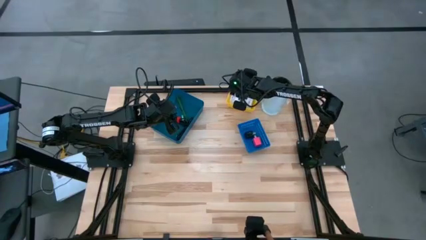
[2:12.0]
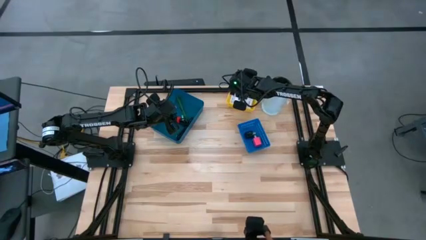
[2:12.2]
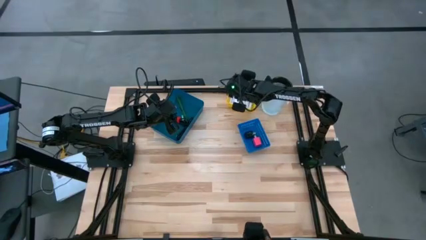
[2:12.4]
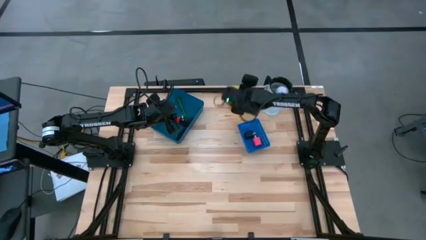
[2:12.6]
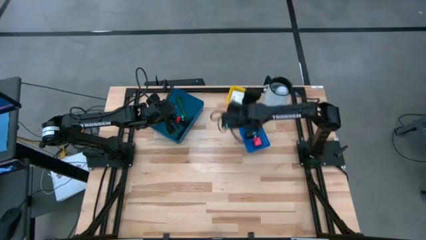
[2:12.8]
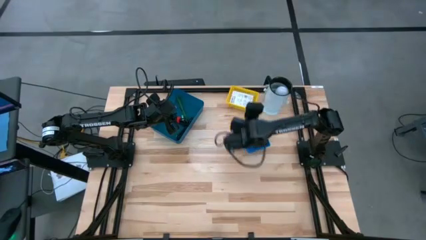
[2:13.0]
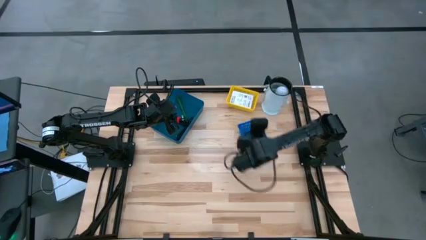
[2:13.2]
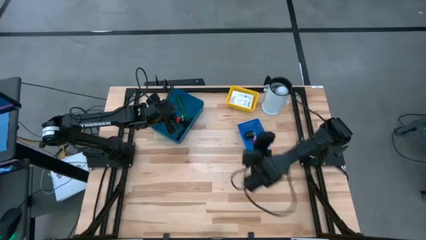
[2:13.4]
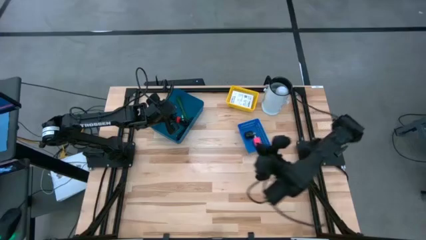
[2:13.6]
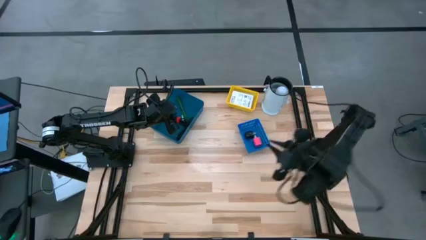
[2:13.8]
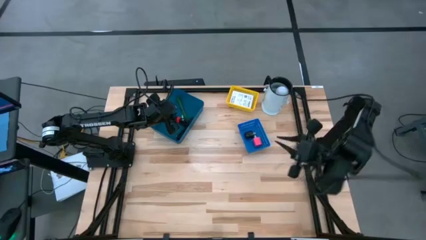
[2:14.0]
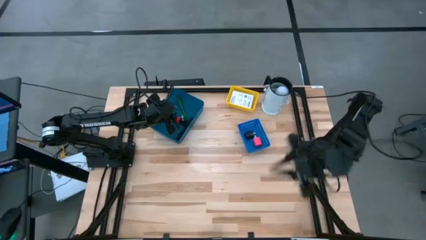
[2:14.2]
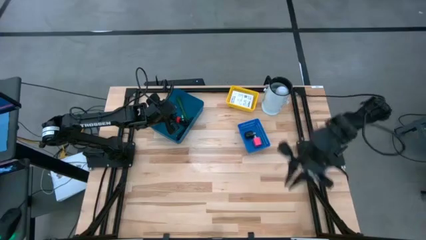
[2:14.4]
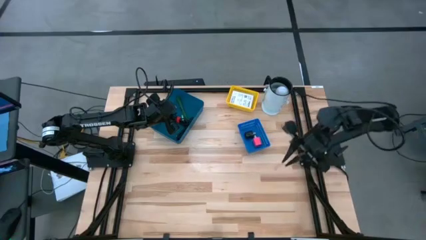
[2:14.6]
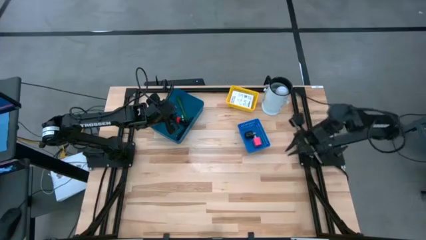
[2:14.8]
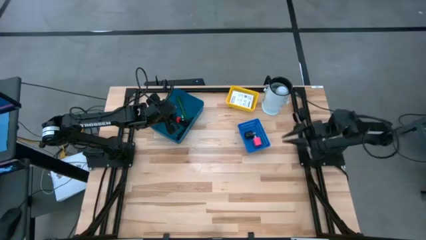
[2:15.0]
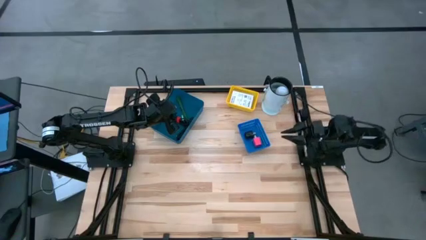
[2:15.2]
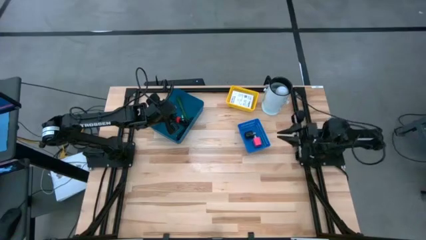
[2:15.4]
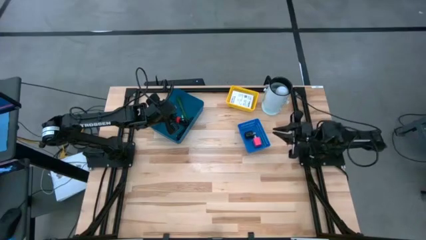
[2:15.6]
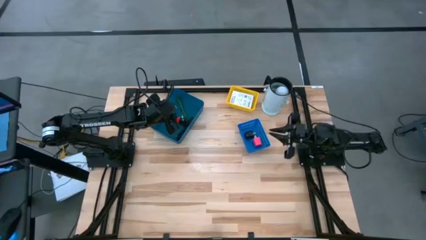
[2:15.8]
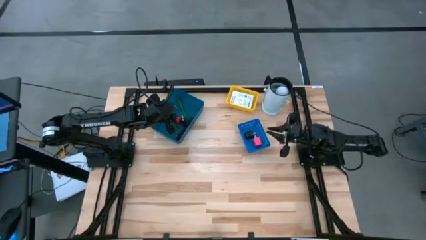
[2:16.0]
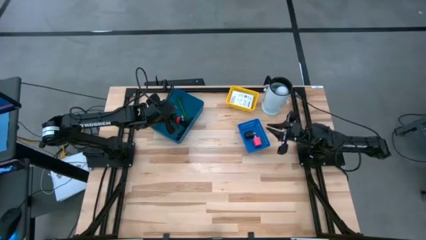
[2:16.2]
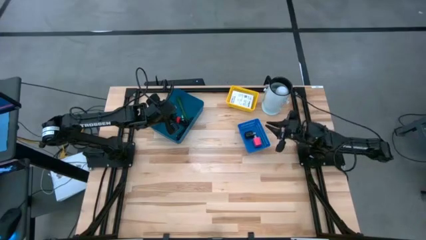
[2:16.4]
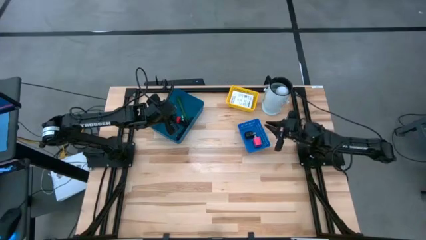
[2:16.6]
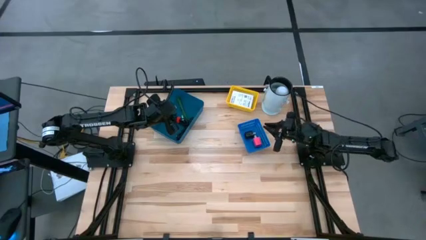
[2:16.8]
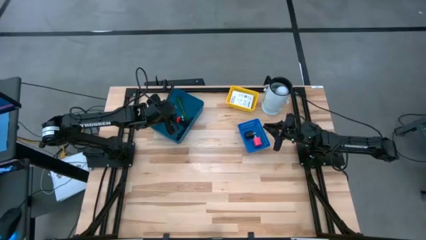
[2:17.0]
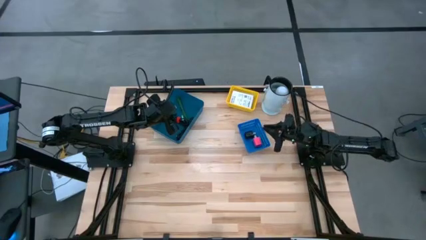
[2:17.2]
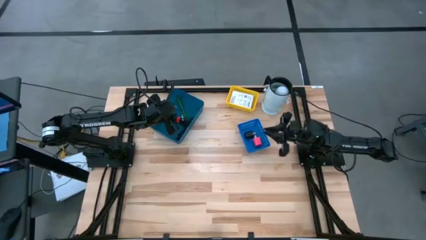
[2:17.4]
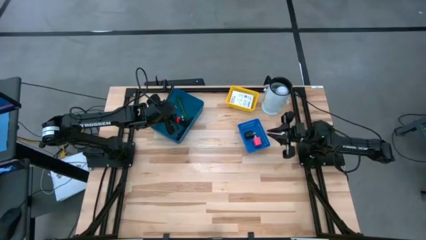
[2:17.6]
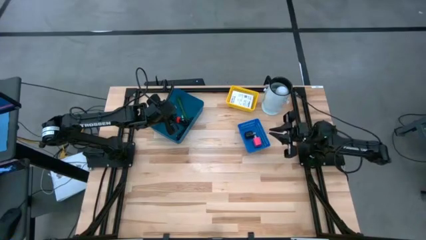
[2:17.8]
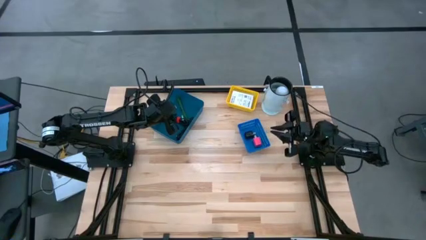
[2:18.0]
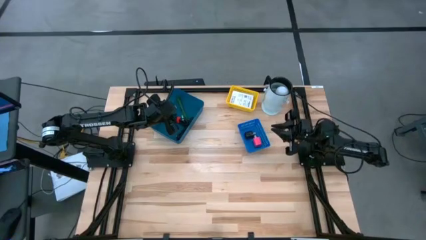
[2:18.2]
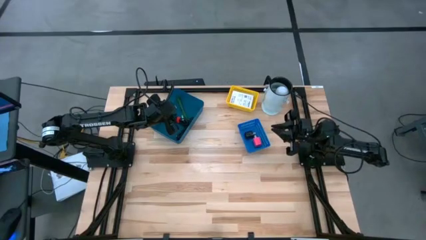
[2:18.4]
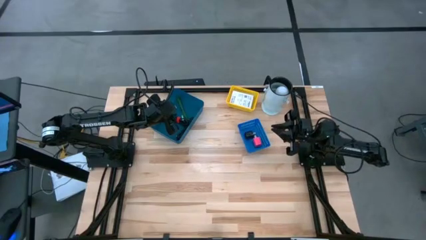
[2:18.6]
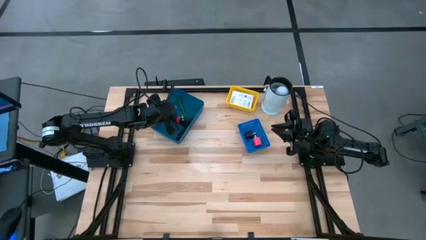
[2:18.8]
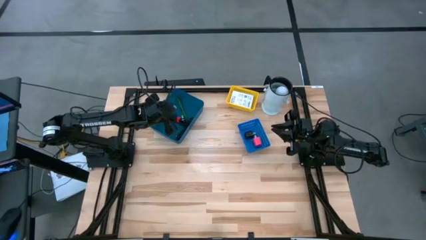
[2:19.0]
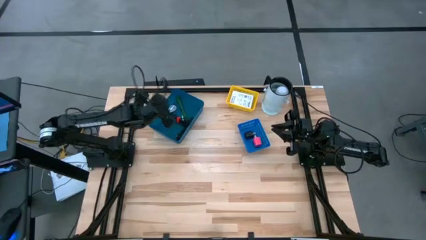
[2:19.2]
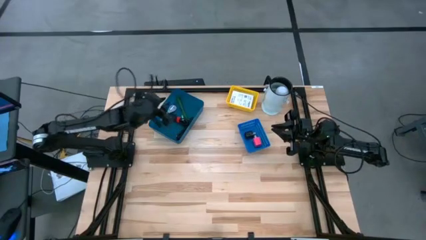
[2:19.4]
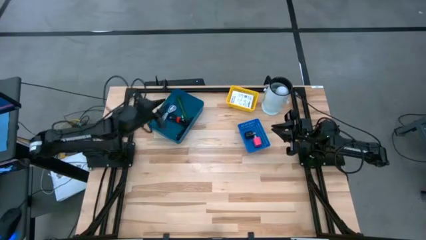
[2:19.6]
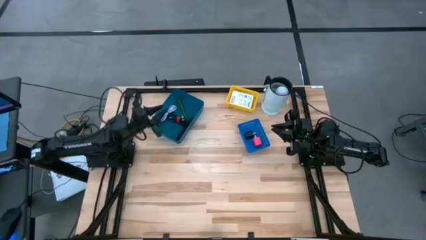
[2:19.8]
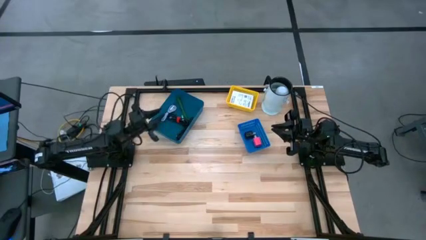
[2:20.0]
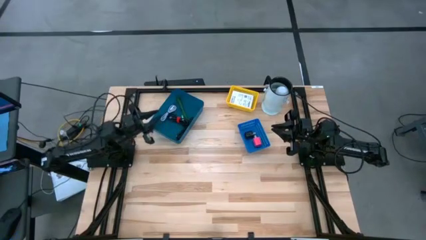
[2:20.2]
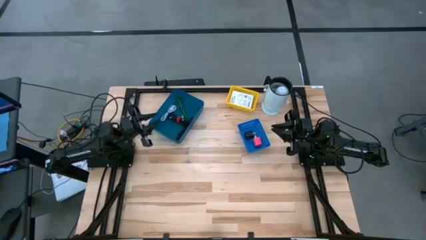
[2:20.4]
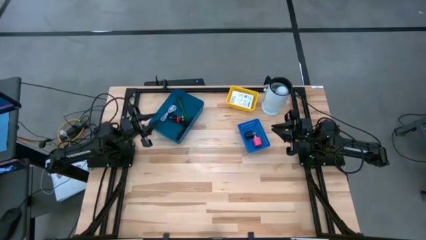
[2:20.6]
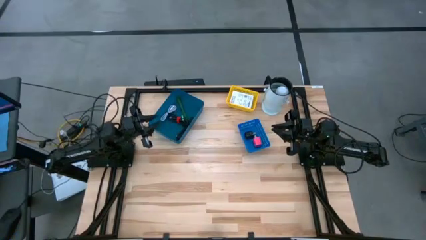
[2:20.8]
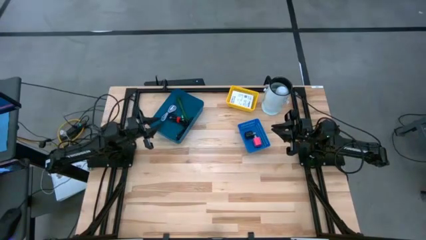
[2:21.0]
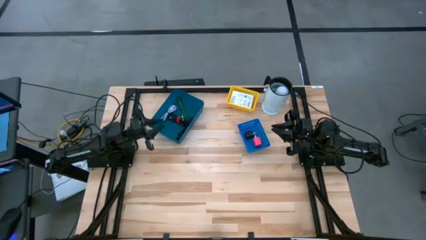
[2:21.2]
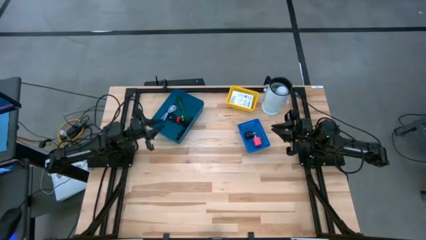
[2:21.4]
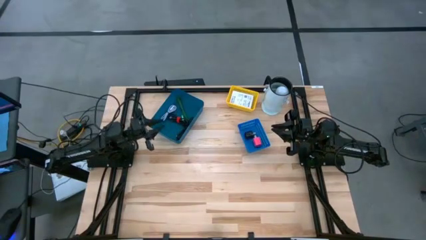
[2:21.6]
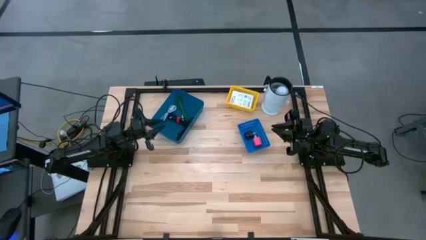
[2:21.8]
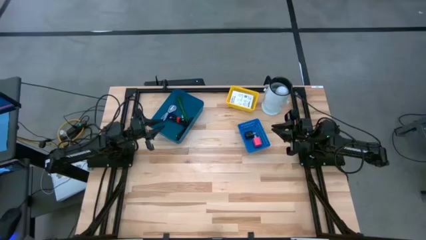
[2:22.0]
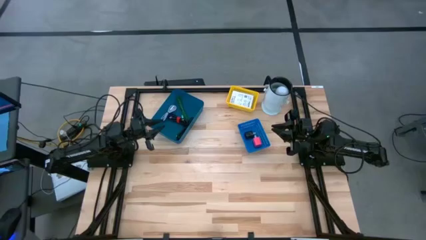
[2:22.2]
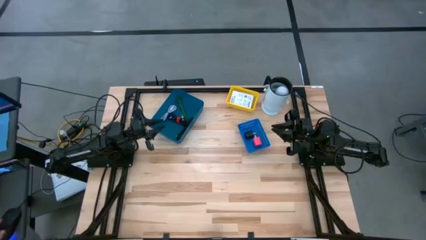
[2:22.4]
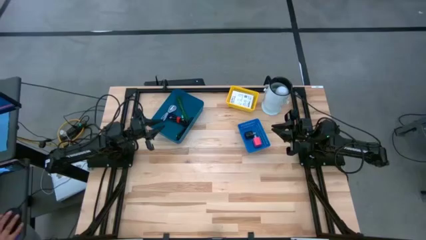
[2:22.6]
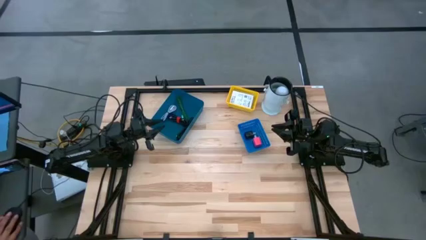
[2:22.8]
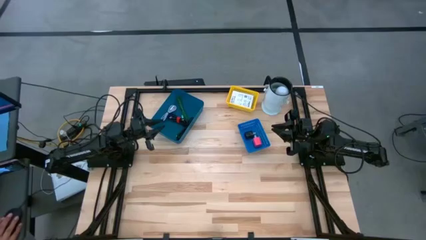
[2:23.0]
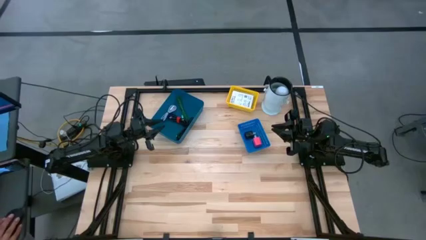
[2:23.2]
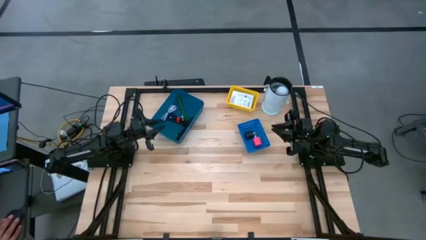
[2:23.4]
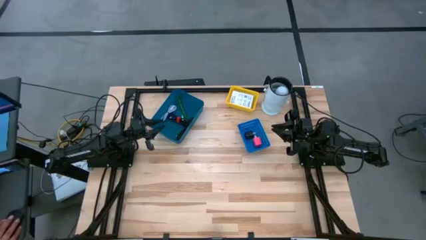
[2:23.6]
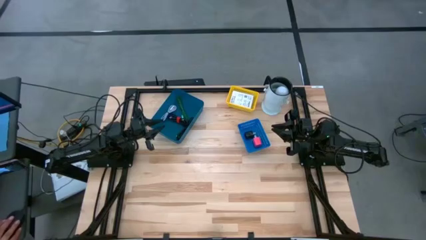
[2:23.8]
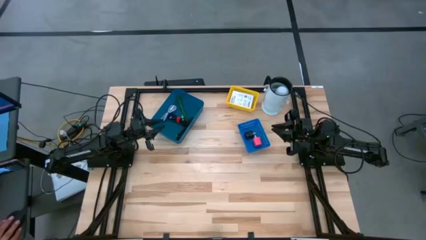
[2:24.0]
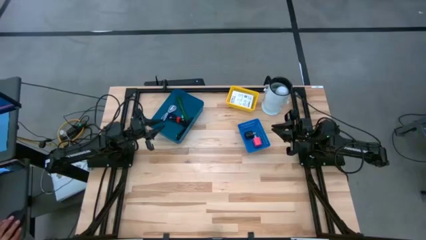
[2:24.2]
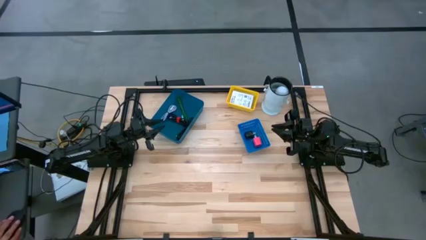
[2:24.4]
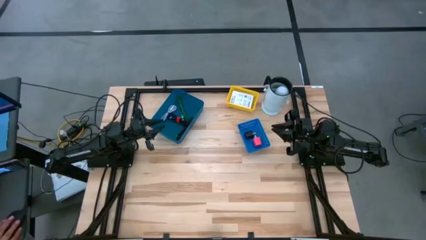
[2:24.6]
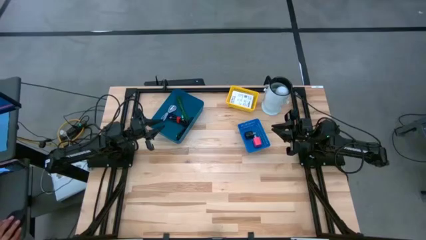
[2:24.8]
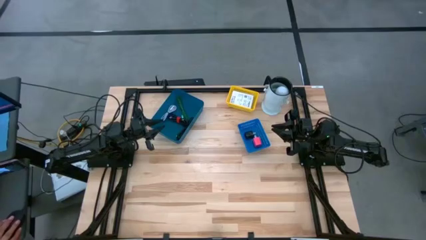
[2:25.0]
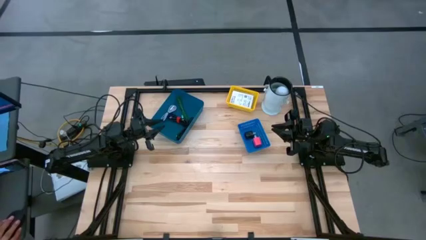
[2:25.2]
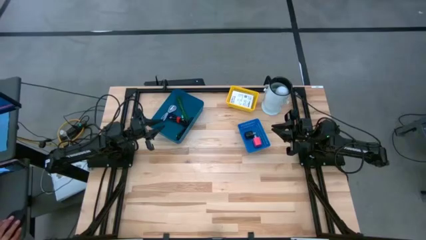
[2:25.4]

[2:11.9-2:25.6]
Task: Pick and place items into bin
Return to Home Position

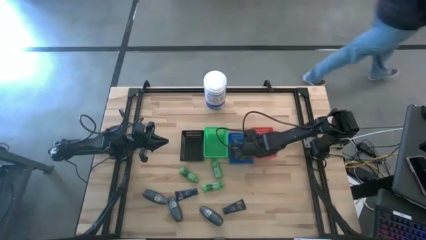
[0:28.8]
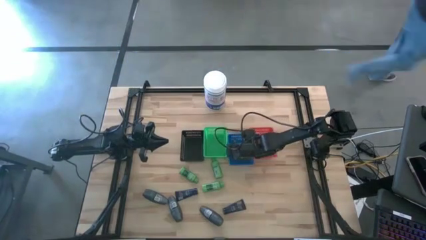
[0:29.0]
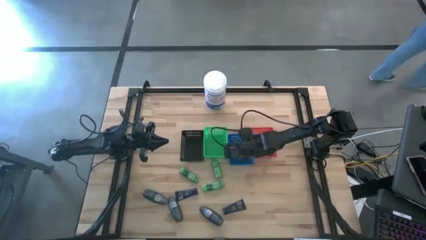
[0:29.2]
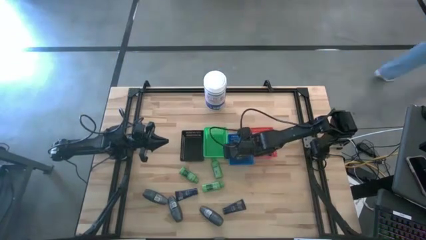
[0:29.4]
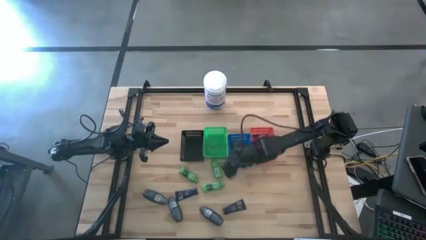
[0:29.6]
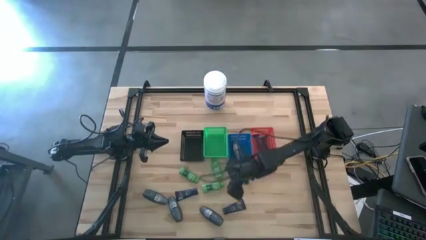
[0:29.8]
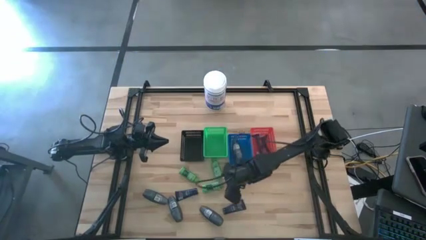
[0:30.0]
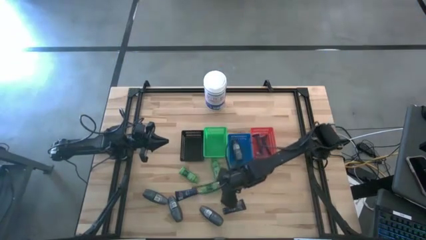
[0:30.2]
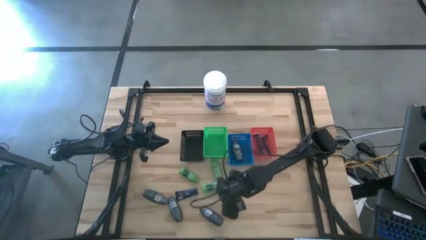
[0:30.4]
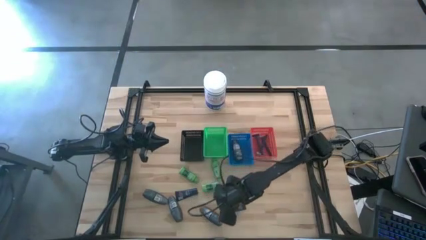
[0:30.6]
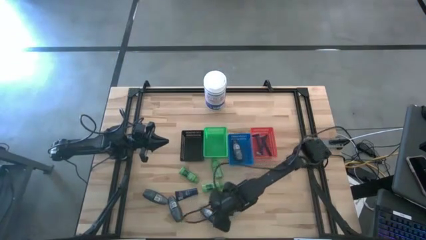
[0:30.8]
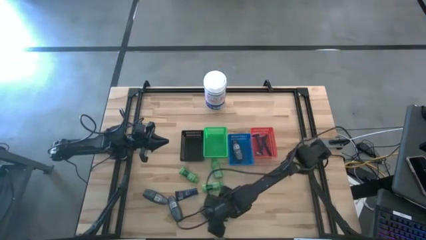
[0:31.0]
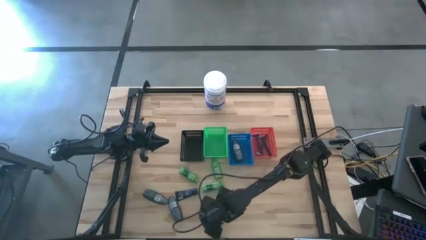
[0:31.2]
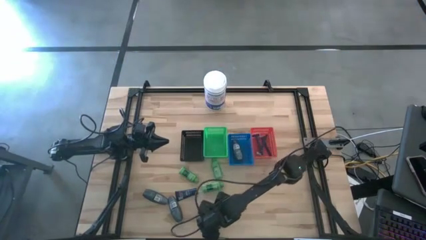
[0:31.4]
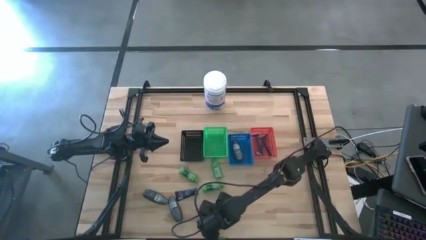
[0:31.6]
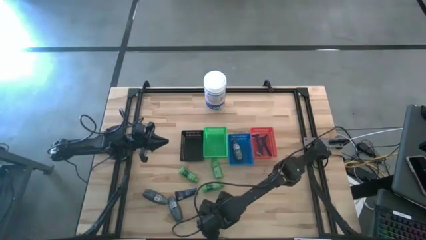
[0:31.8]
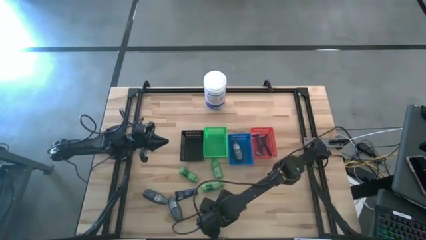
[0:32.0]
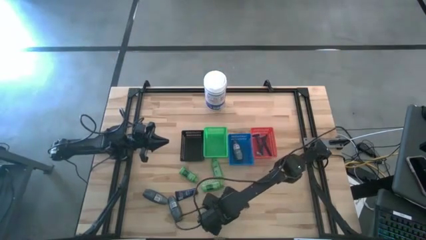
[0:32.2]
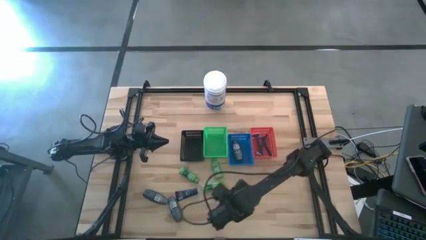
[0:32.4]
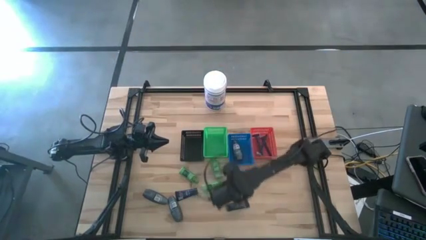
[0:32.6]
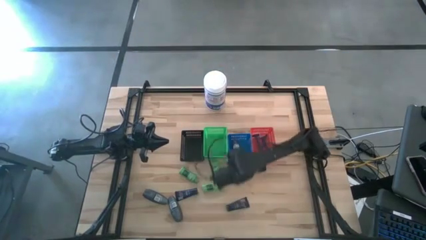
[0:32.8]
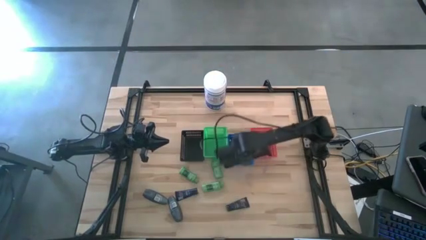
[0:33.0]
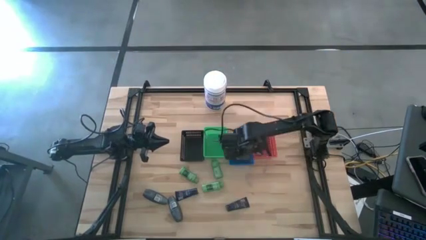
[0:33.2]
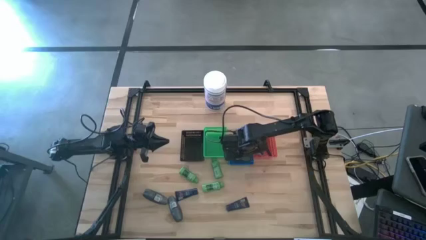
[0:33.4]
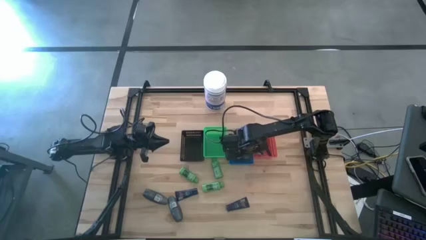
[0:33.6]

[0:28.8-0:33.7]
Task: Pick & Place Travel size toiletries
Put the deodorant into the blue basket
